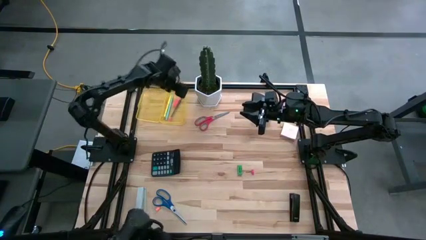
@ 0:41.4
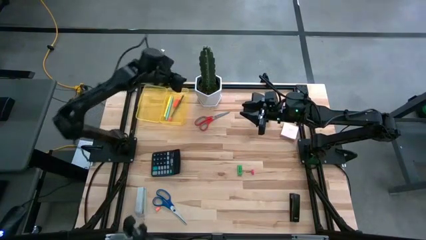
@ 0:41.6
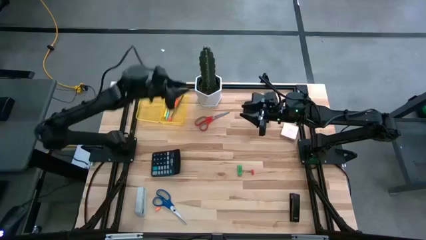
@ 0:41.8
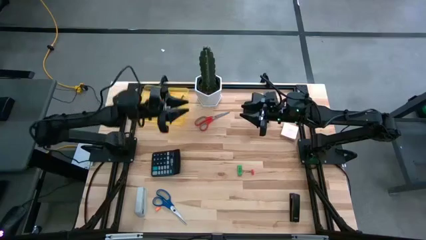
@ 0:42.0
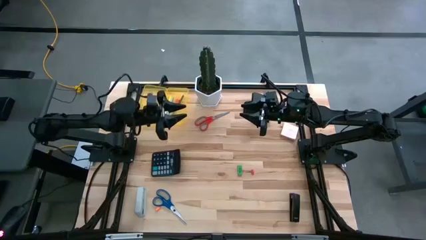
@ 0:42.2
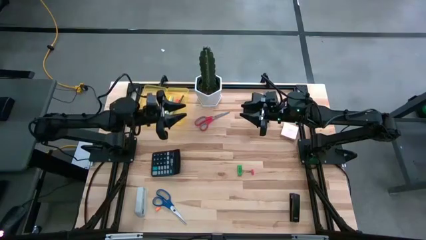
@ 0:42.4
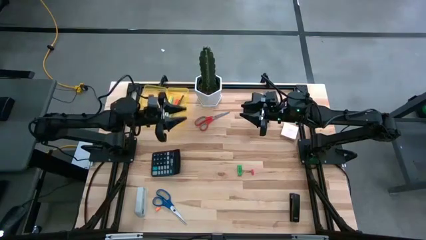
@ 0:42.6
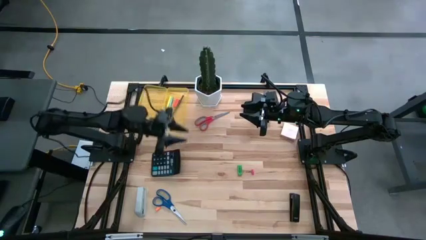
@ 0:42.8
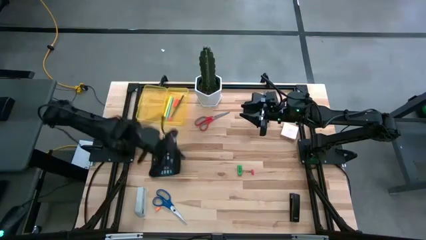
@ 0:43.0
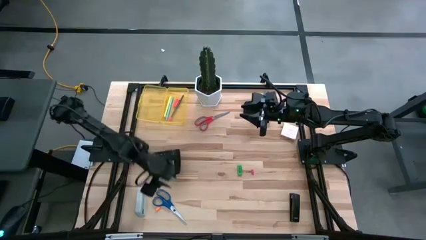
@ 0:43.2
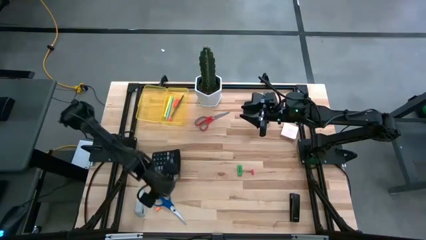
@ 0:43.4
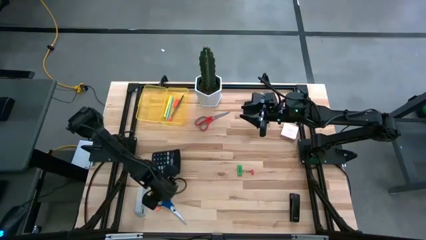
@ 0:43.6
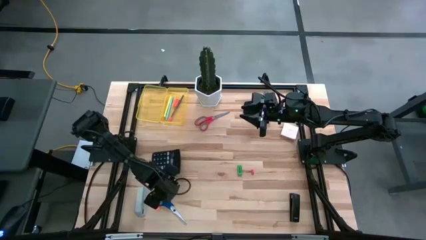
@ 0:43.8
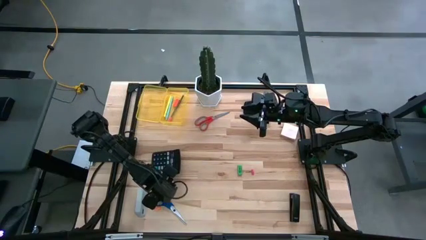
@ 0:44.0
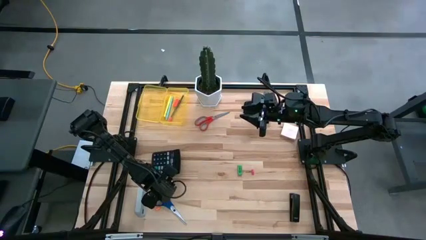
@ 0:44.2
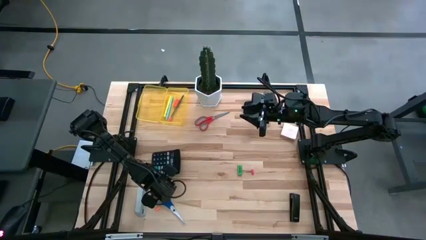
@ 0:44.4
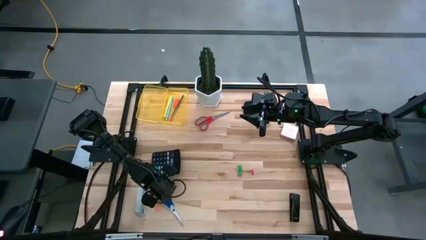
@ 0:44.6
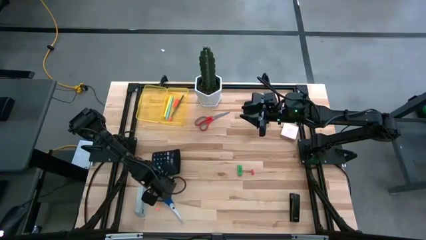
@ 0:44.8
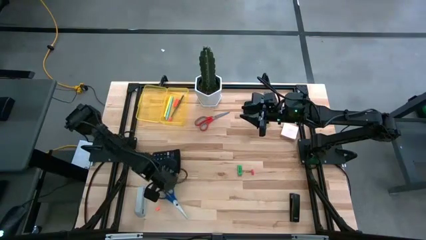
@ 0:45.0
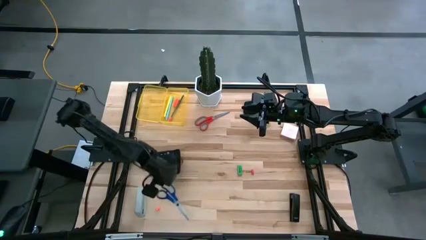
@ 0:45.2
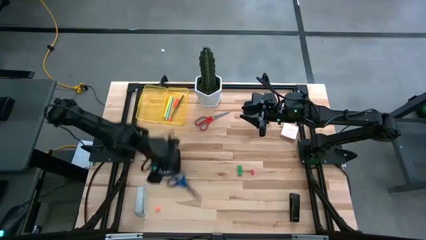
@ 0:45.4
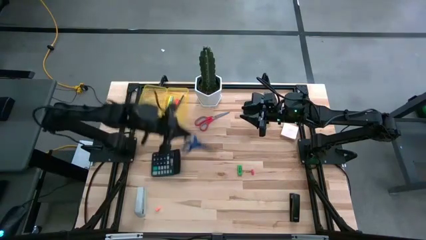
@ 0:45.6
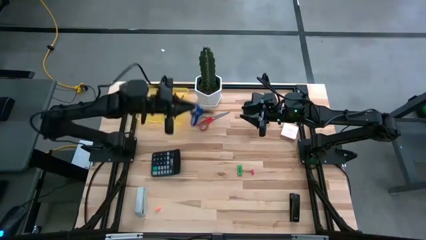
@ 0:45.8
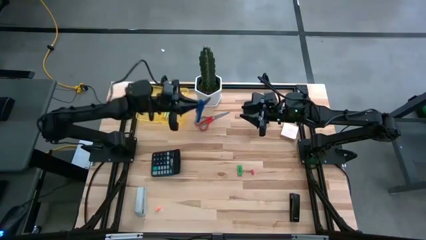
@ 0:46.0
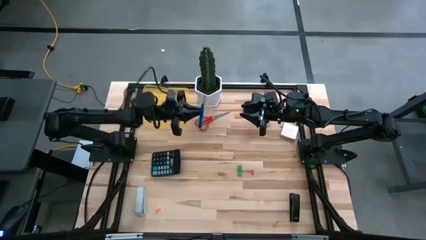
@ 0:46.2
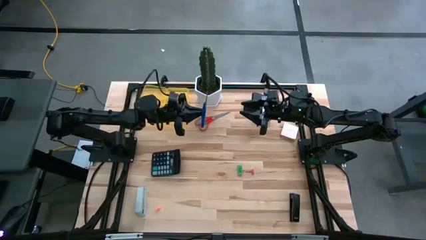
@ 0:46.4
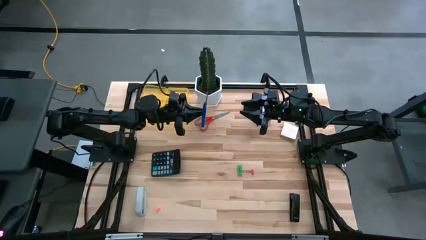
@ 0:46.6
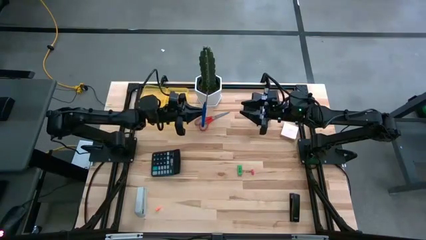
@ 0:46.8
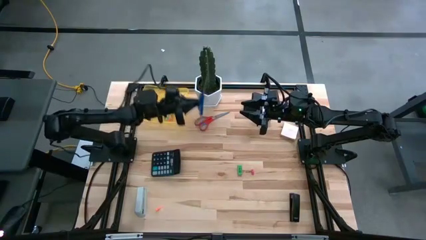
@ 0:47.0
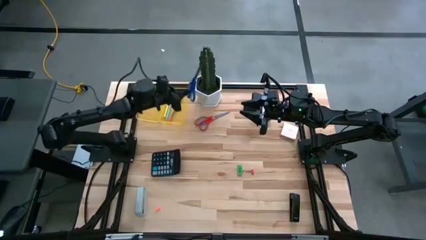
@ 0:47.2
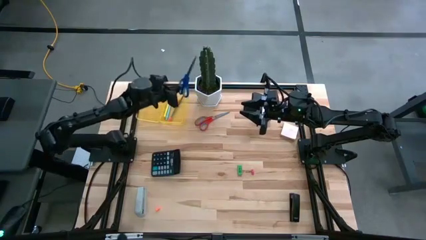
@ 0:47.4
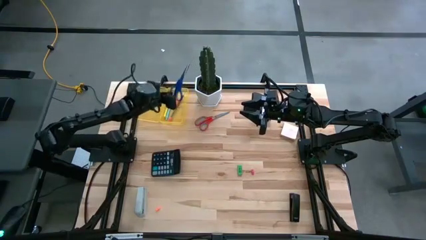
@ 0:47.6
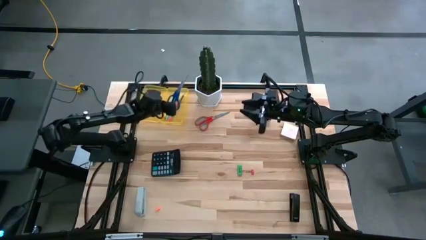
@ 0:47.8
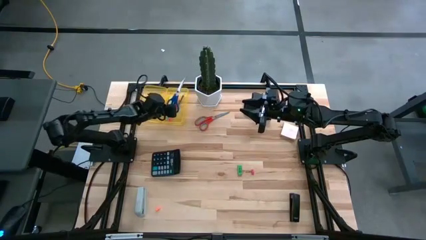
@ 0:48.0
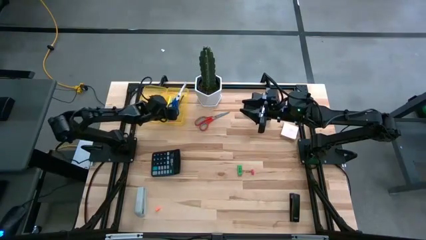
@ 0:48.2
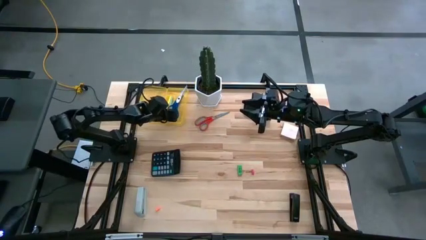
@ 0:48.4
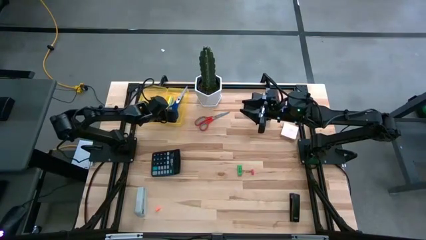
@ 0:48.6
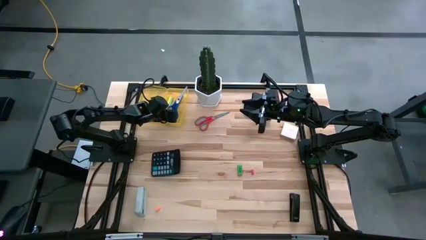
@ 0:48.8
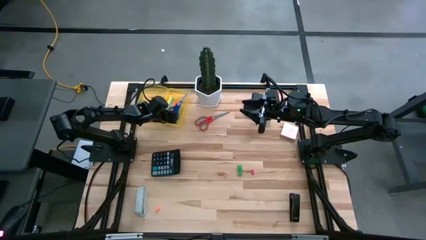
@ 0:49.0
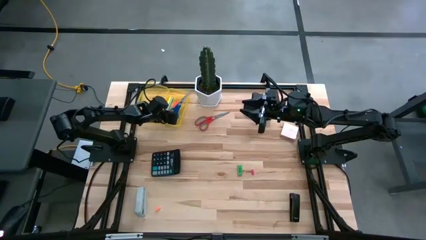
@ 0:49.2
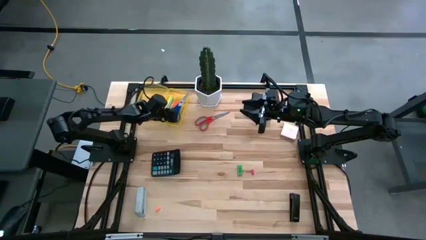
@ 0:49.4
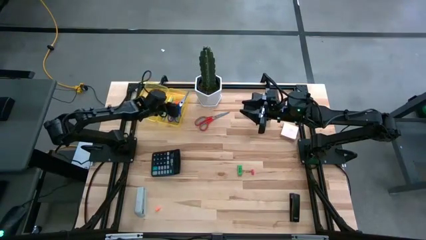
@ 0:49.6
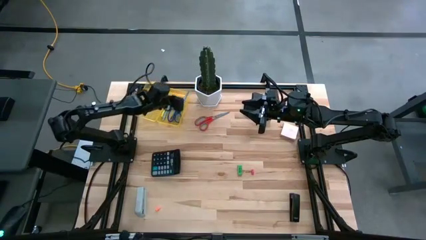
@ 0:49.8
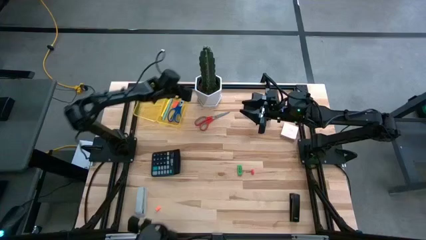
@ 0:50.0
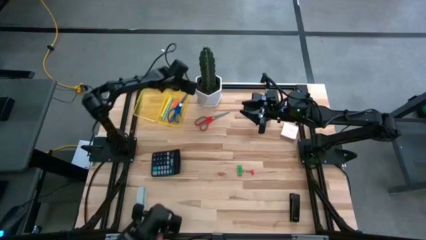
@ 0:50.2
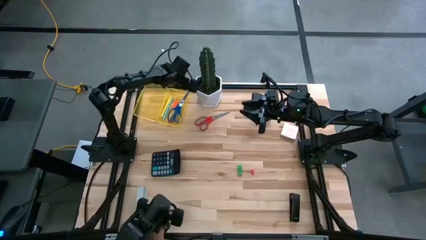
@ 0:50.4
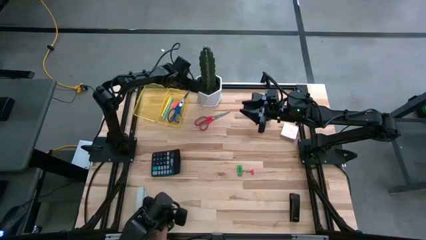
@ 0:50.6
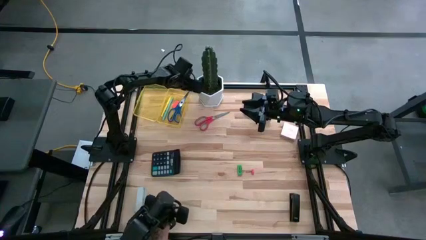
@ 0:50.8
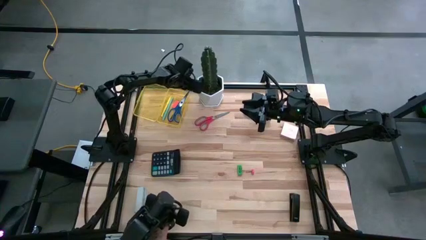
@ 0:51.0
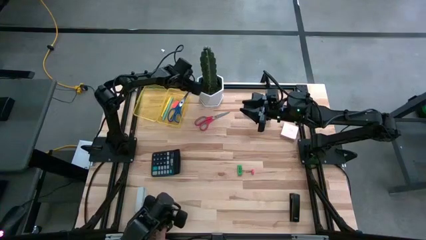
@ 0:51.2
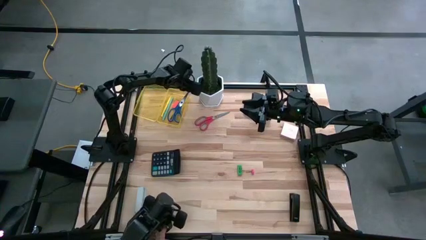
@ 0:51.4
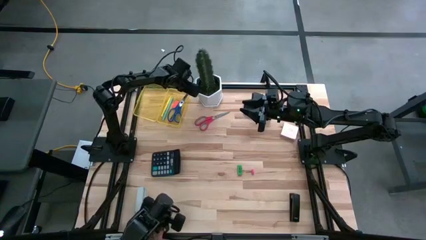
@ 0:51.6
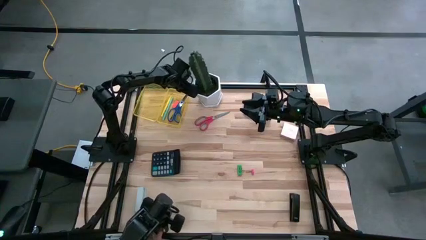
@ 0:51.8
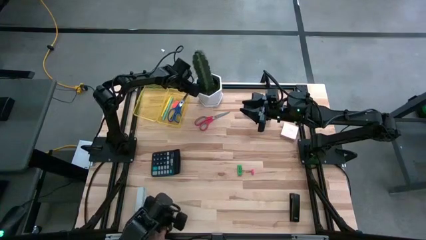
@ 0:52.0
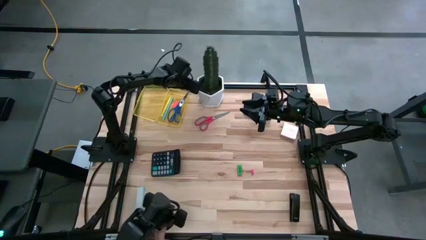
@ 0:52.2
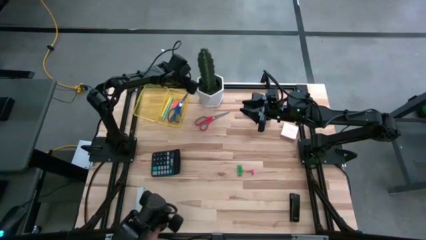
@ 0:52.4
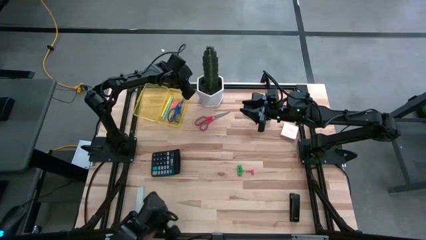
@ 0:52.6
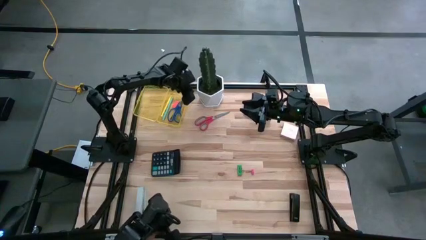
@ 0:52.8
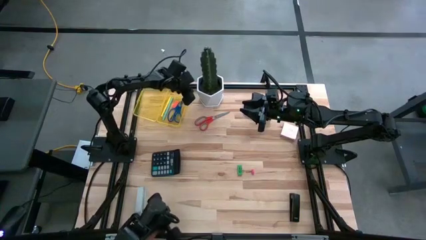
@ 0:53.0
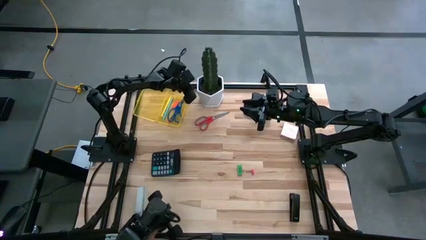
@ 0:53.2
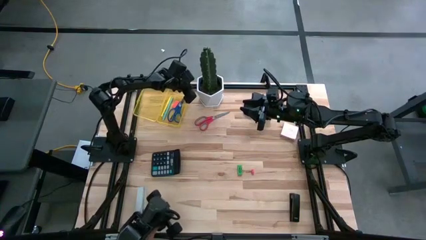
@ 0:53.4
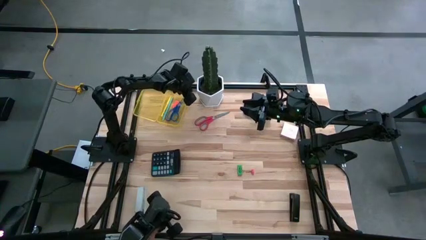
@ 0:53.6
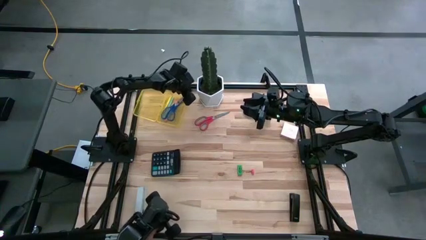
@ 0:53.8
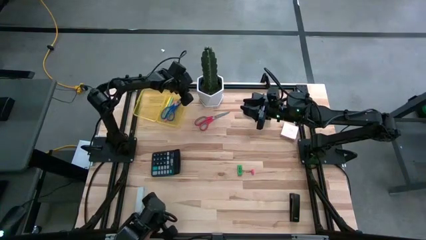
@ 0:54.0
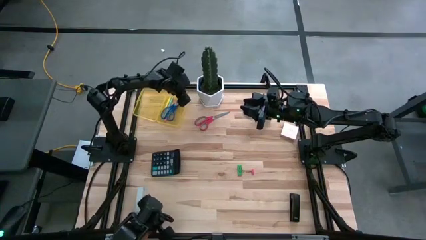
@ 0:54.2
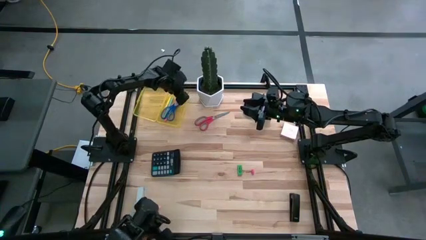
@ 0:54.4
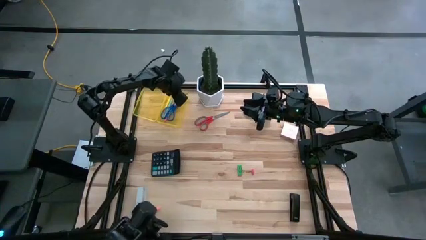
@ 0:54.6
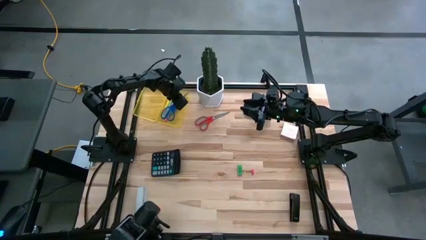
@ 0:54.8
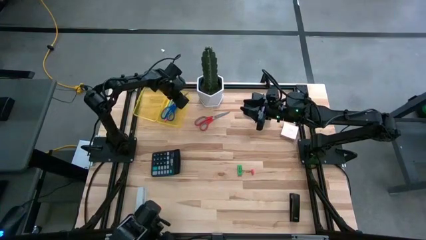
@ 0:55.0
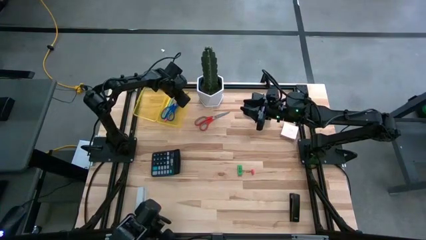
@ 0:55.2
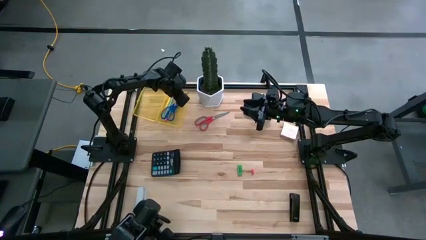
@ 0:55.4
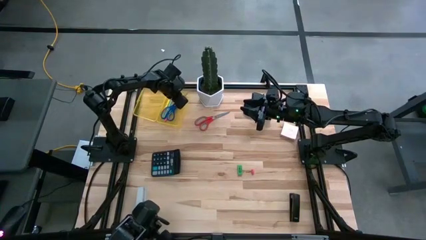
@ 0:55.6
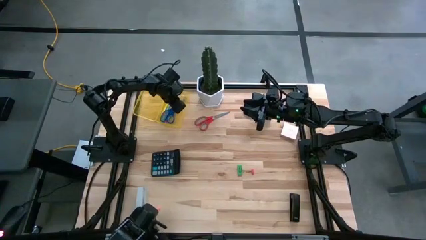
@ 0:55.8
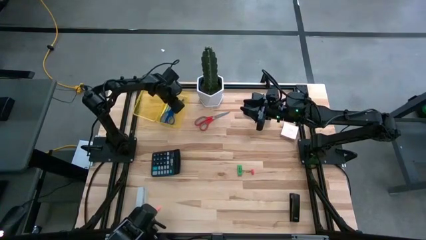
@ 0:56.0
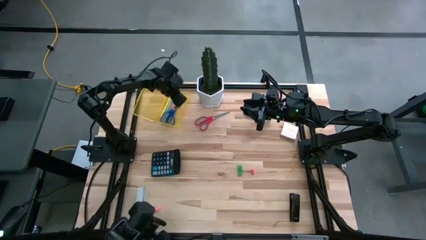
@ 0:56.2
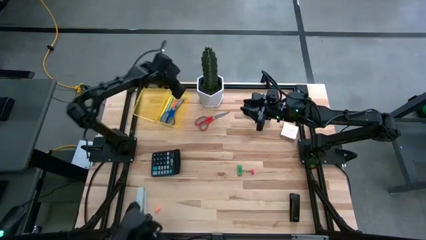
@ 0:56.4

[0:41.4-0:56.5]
Task: Pack school essentials
Put the blue scissors into the transparent yellow supply box
